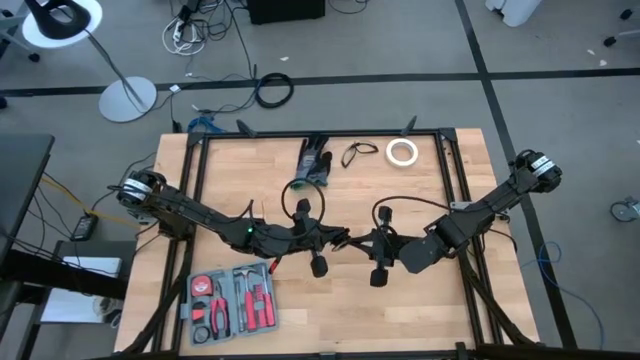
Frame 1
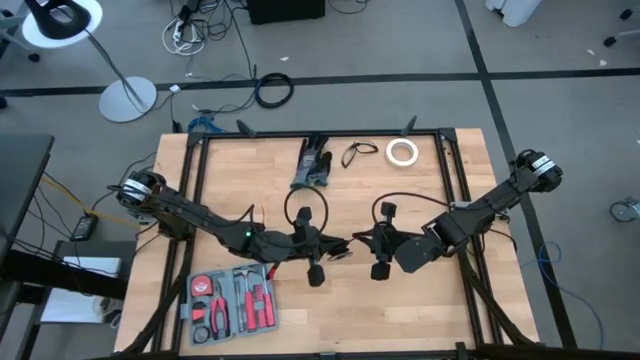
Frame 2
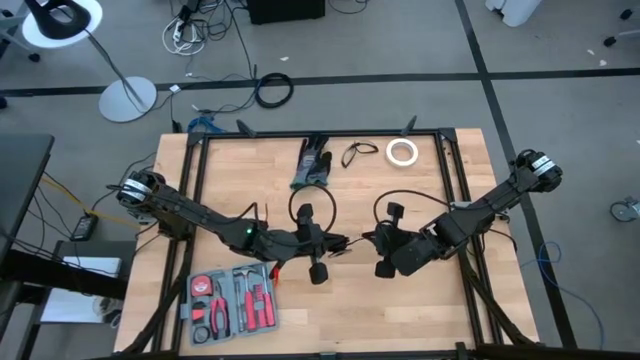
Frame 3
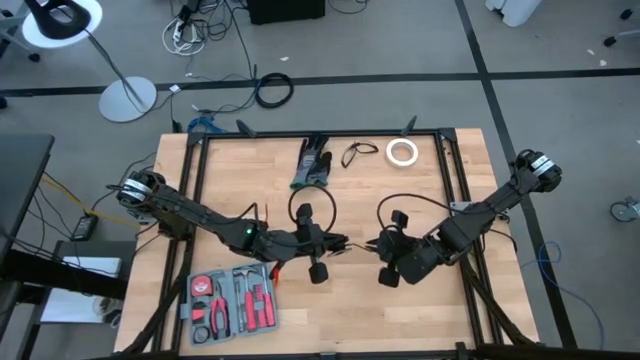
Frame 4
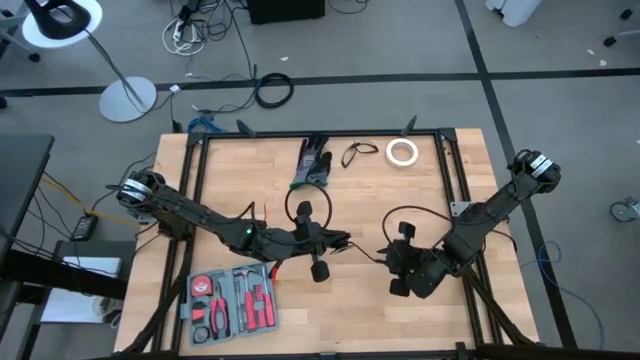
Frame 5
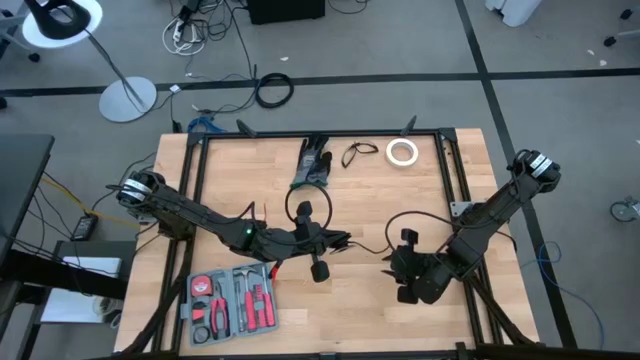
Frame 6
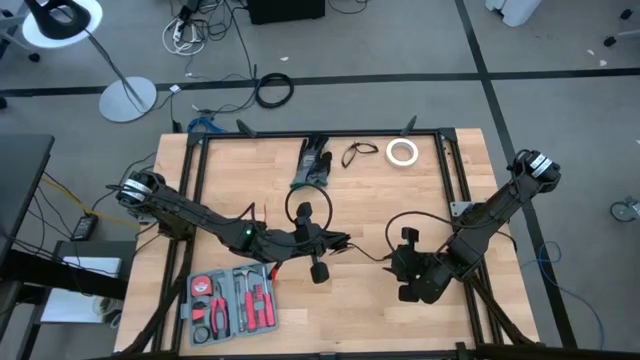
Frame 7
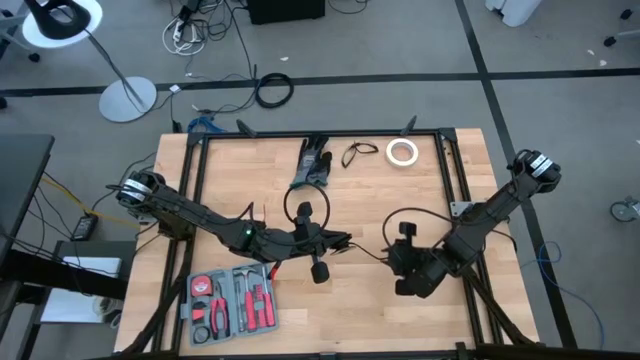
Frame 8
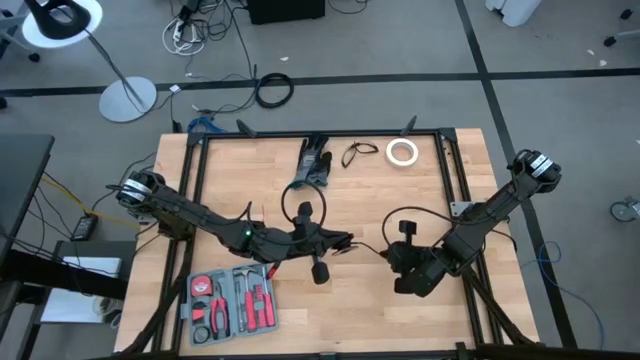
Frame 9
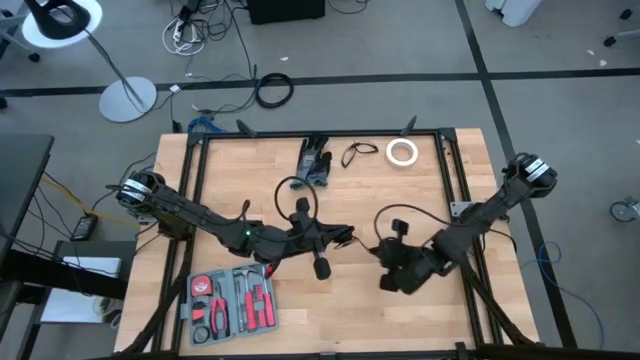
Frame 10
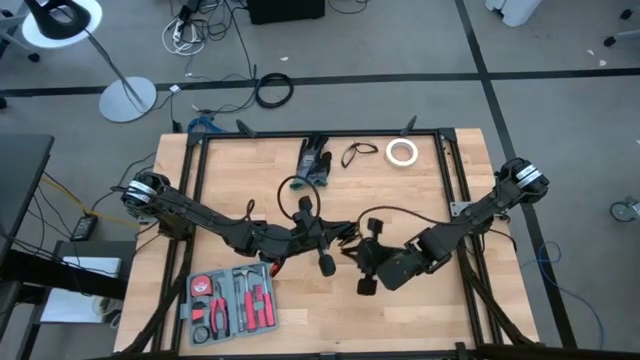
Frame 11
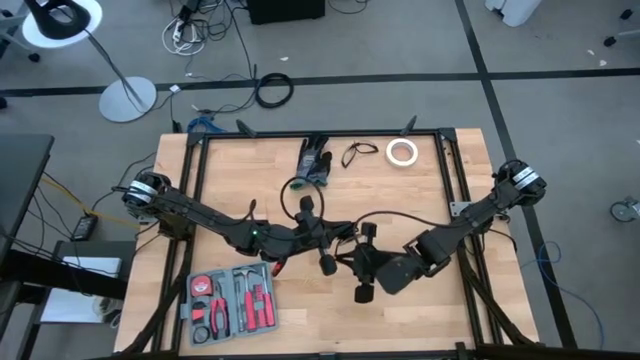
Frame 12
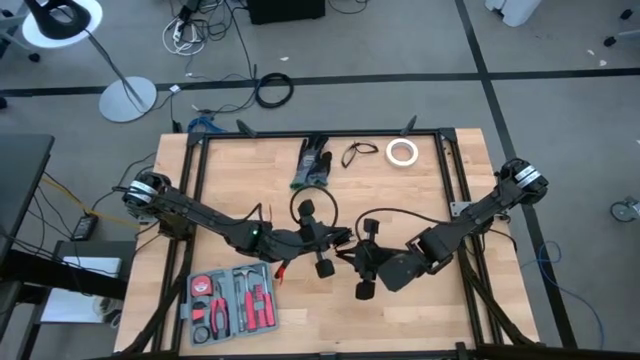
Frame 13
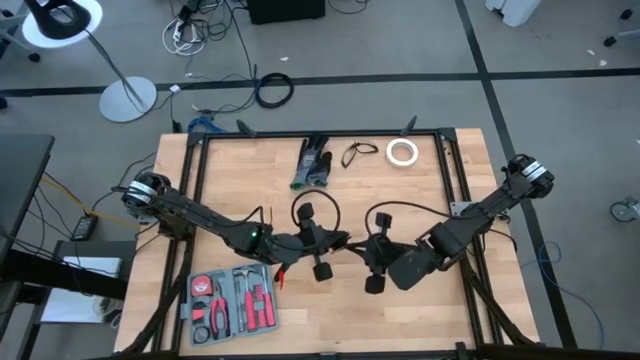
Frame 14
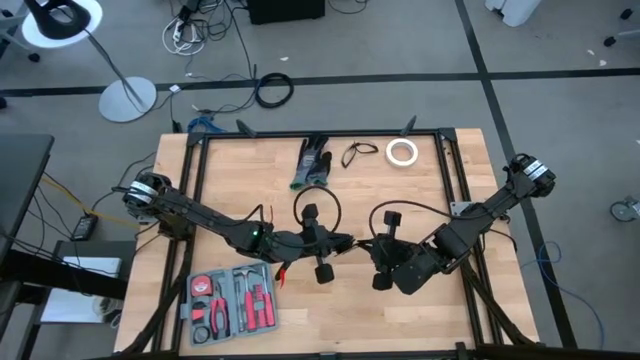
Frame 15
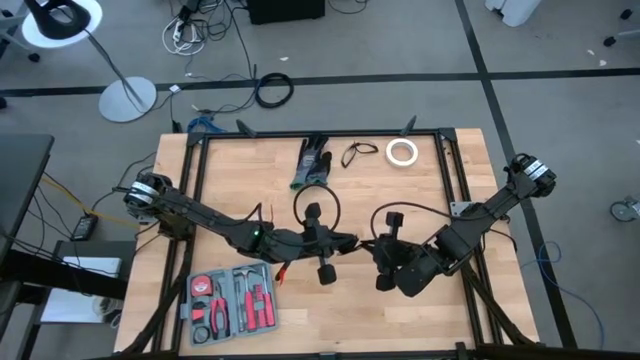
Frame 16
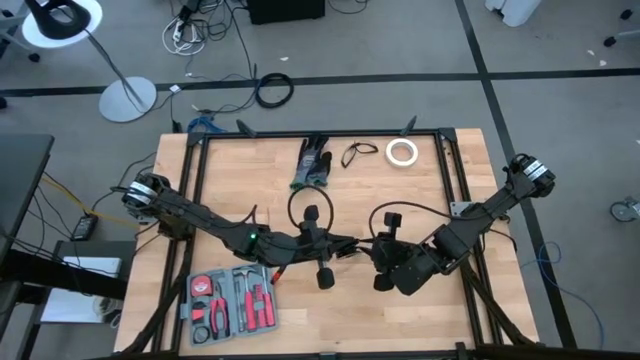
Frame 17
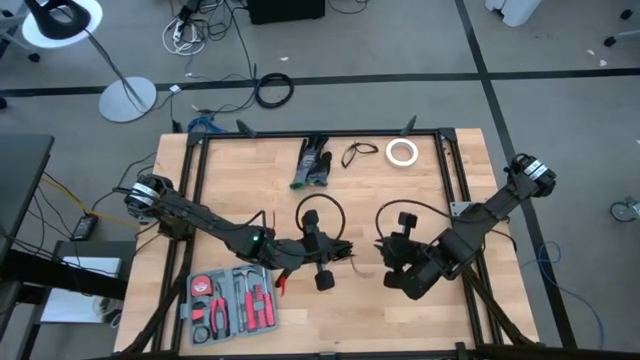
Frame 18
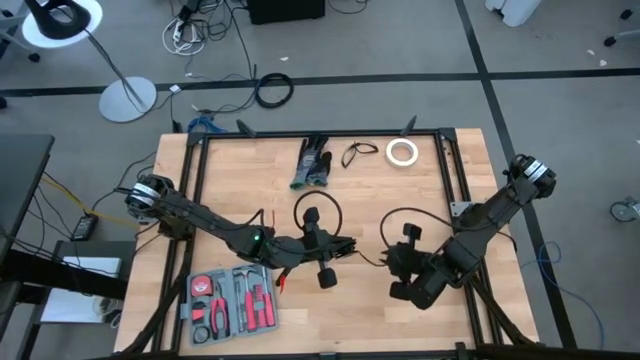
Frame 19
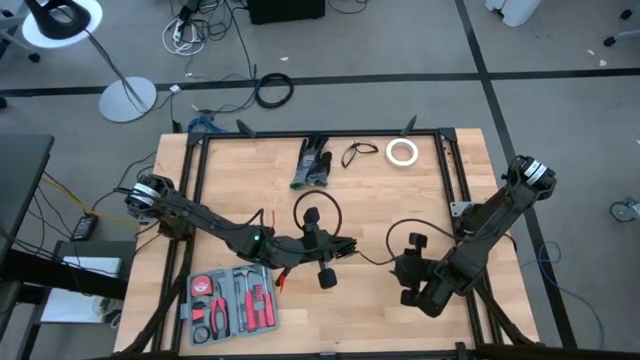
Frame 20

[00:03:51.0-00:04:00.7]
Task: Coil cords
Coil the black wire into a spool

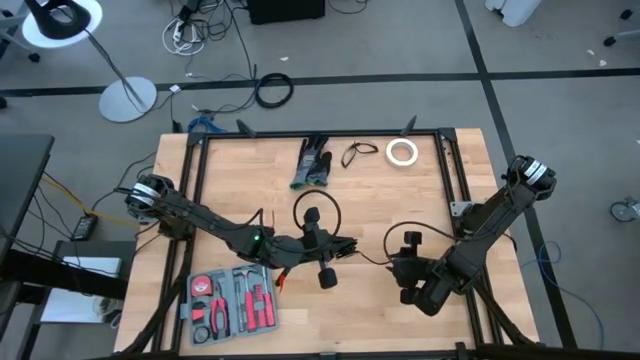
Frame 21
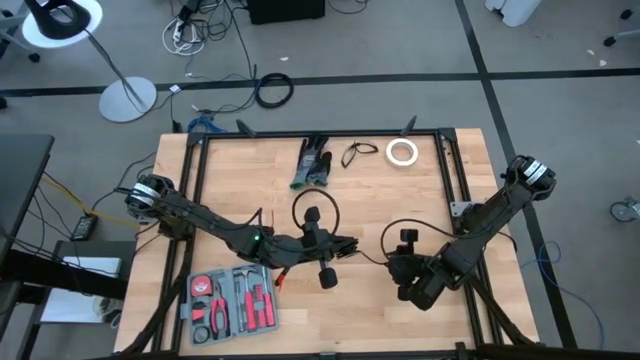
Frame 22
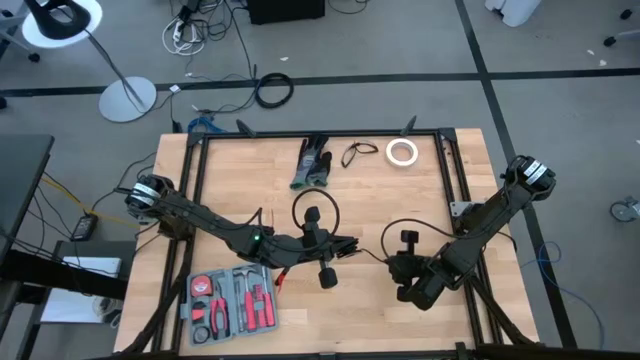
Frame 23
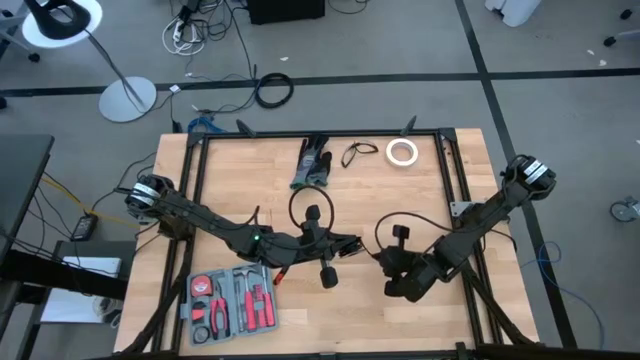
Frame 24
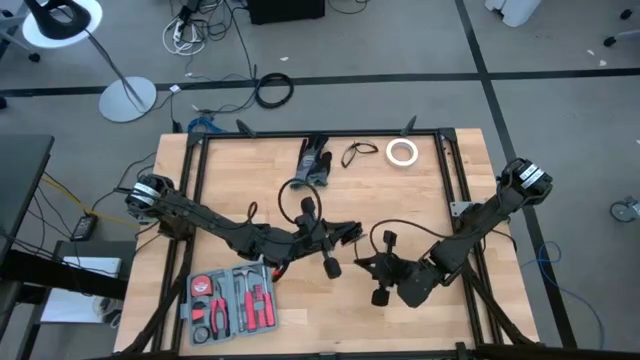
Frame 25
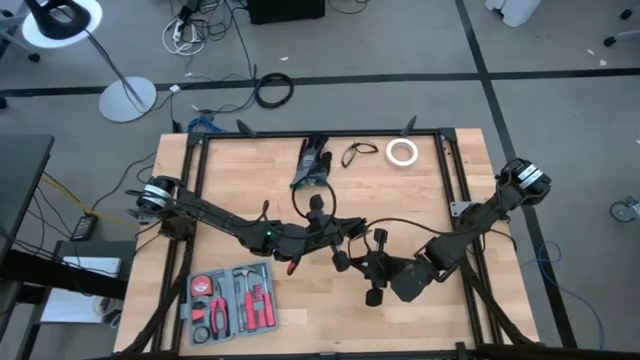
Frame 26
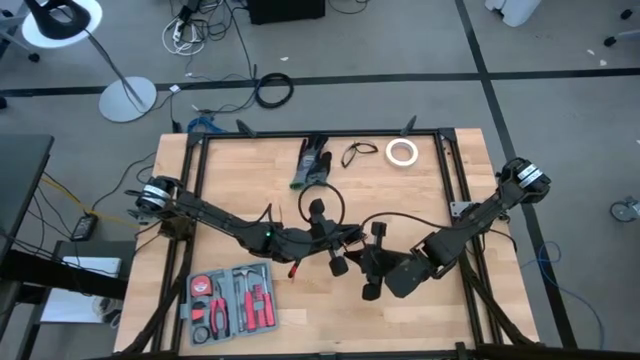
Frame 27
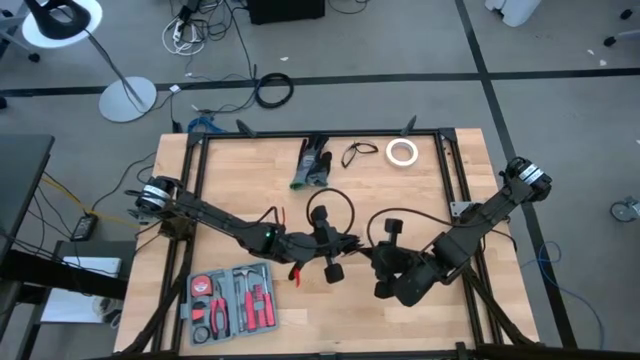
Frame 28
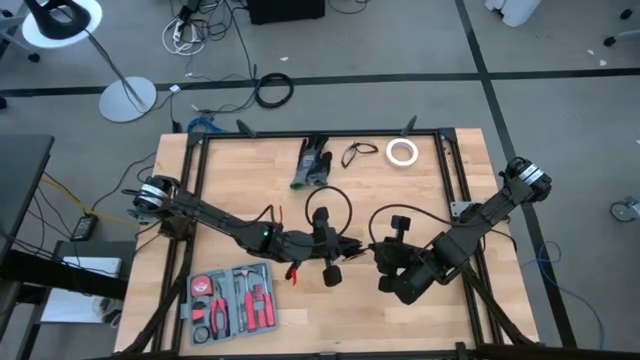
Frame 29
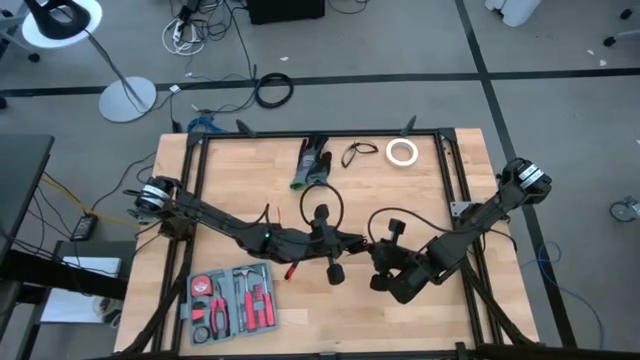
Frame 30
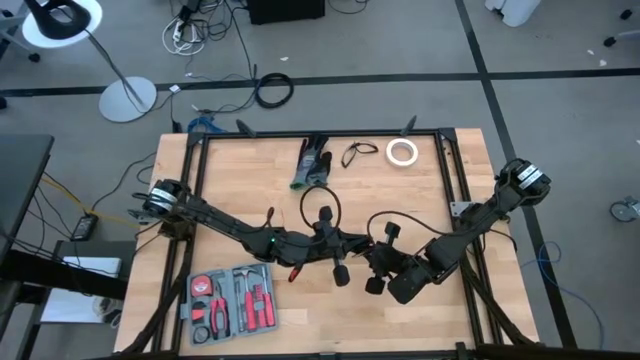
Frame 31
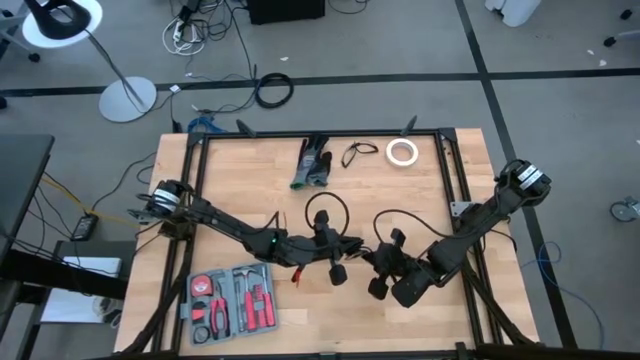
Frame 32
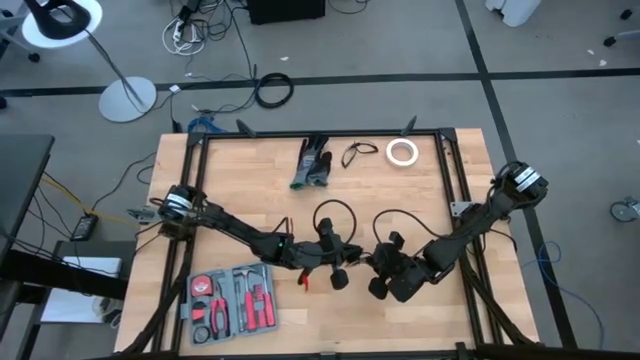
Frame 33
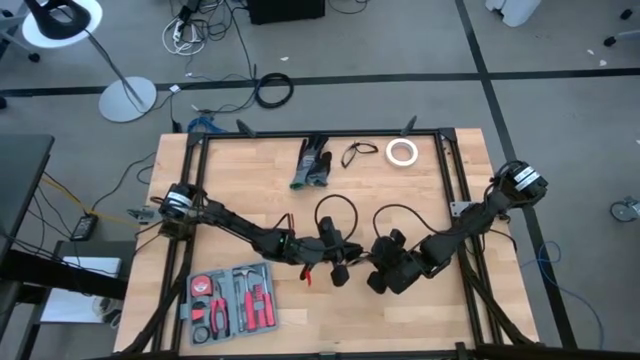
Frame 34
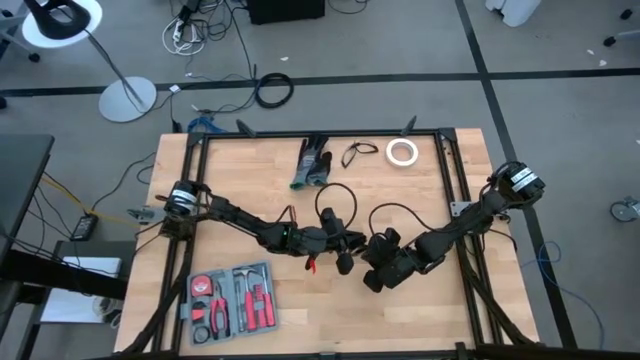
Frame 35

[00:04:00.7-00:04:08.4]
Coil the black wire into a spool

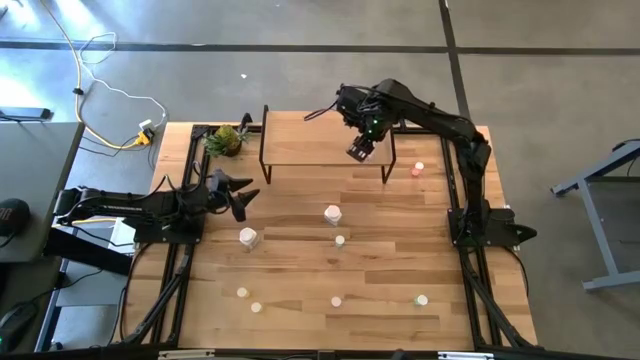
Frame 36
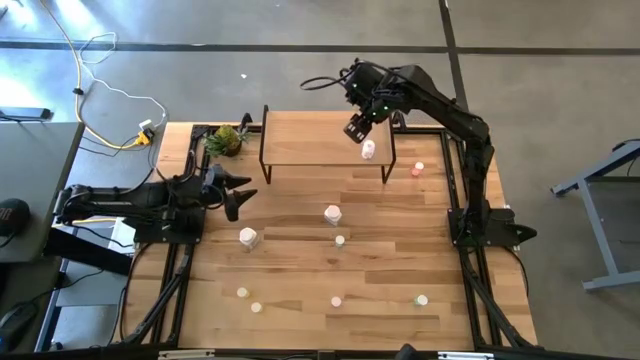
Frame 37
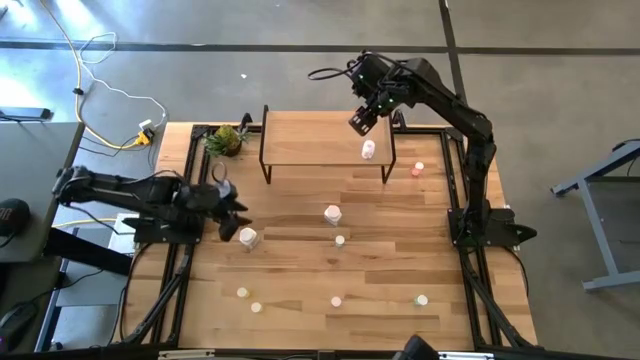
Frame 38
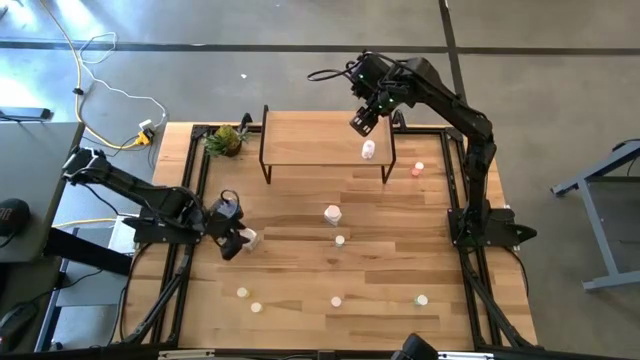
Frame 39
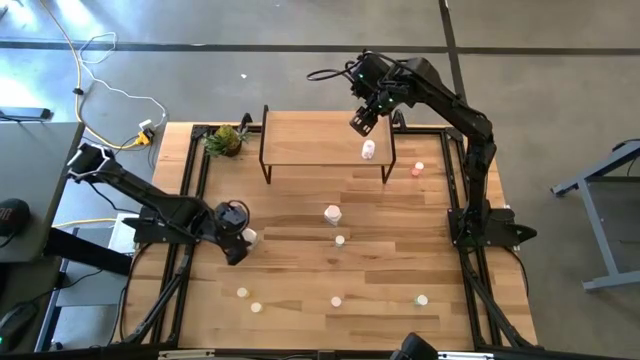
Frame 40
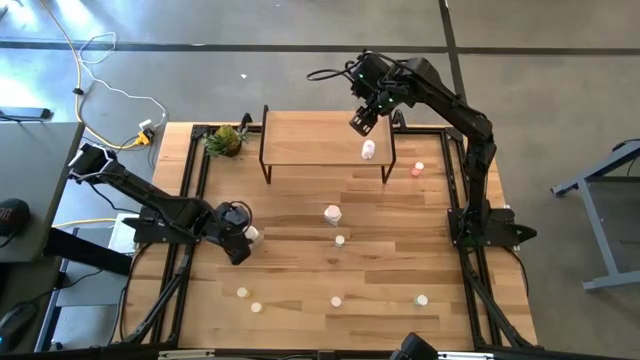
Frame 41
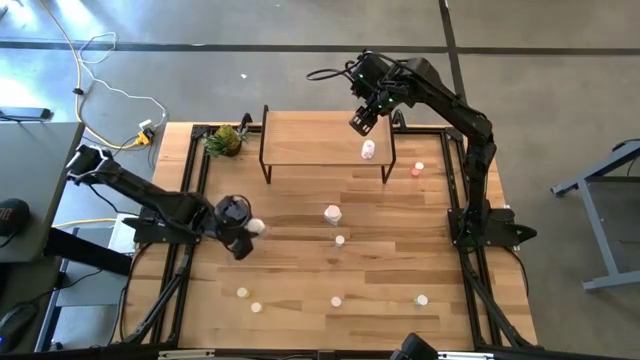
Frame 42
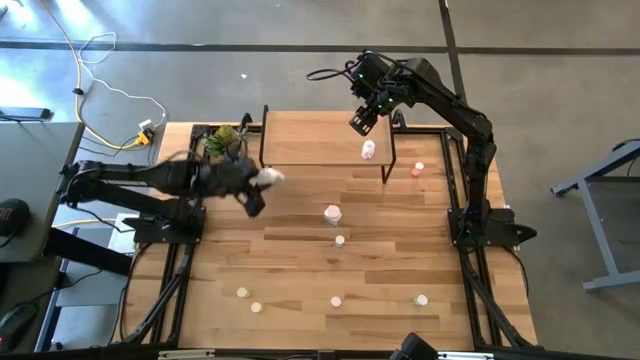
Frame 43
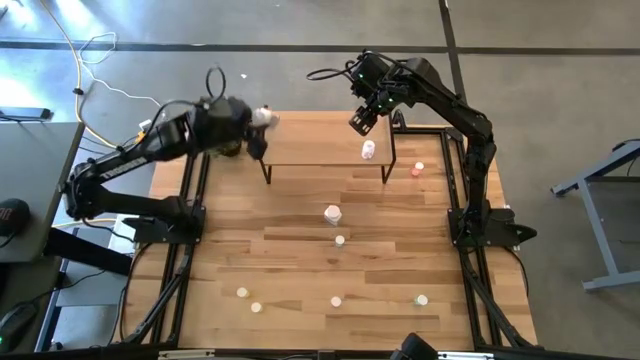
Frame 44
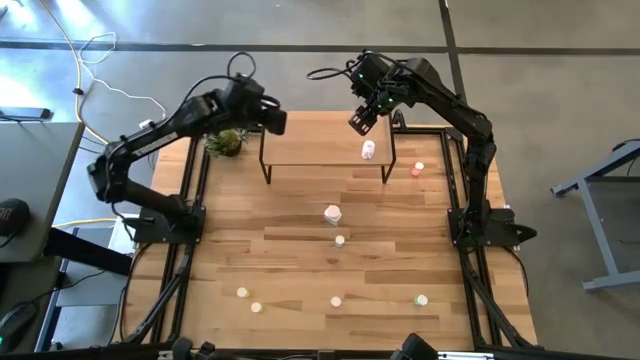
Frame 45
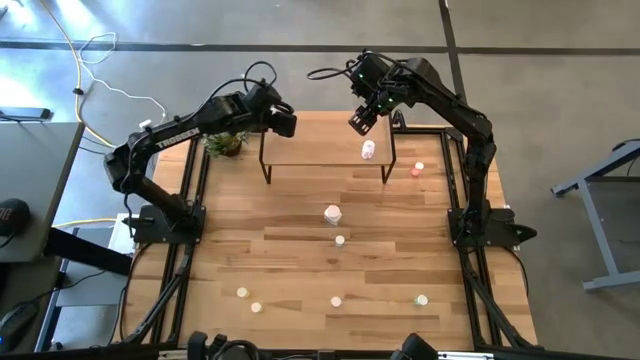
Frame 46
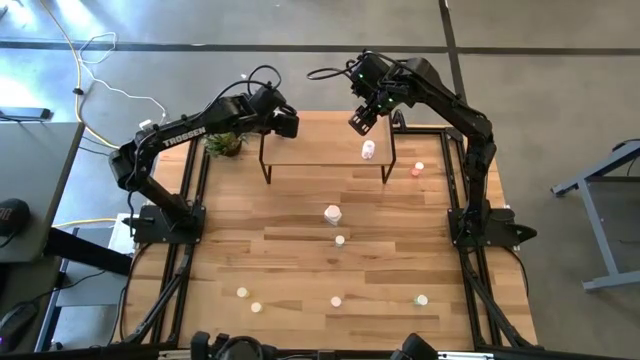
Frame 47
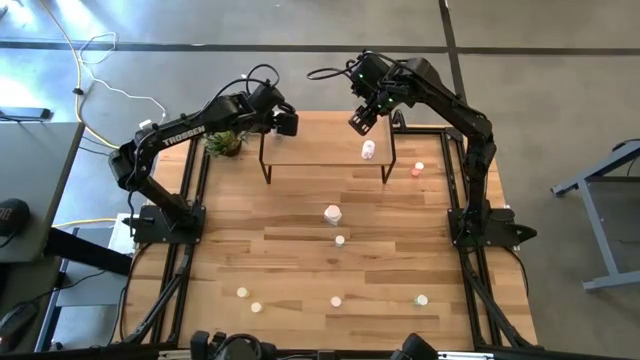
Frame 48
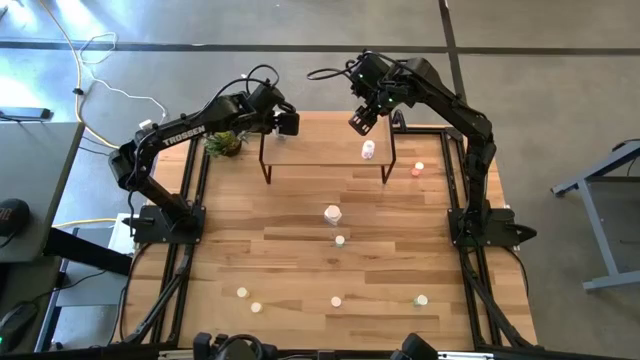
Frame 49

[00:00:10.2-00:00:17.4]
Task: Pick and place medicine bottles onto shelf by color
Put the left white pill bottle on the shelf
